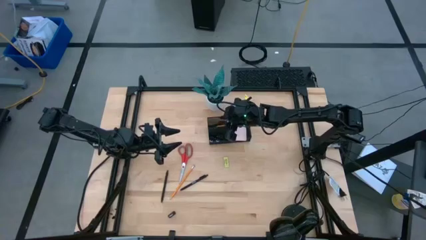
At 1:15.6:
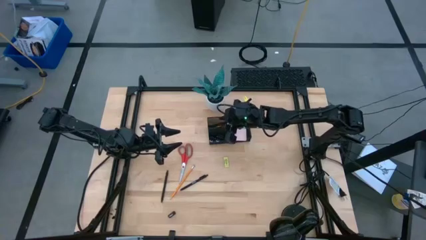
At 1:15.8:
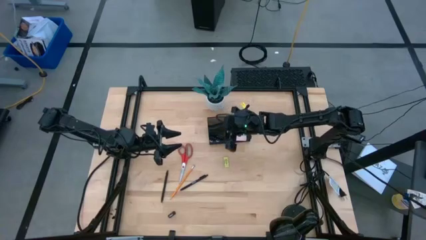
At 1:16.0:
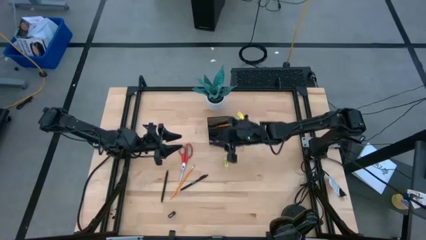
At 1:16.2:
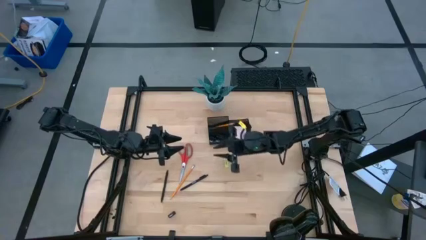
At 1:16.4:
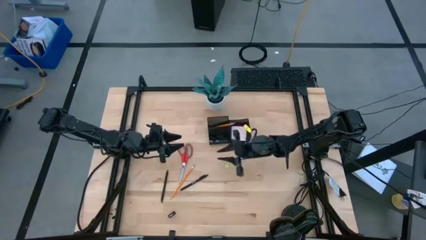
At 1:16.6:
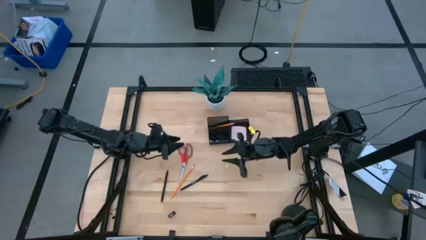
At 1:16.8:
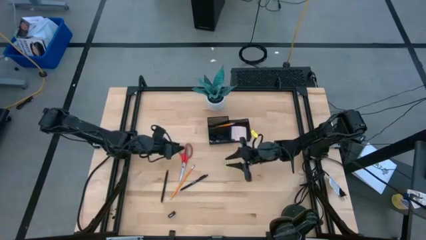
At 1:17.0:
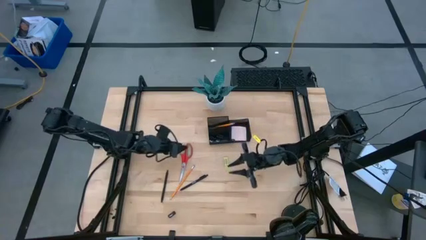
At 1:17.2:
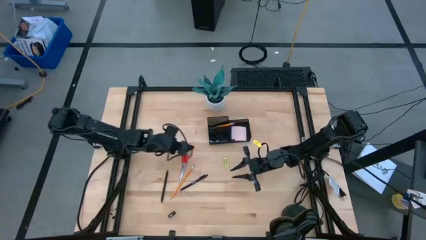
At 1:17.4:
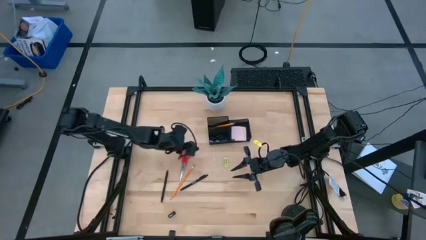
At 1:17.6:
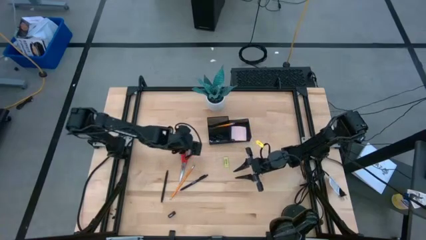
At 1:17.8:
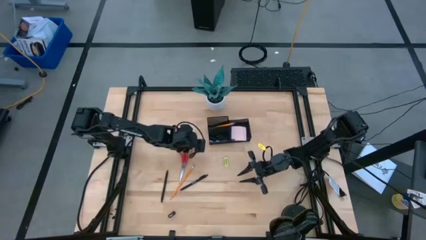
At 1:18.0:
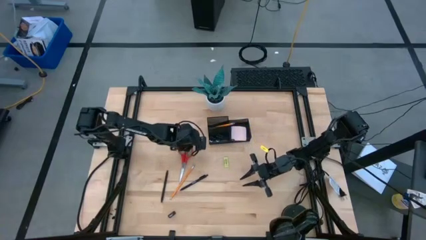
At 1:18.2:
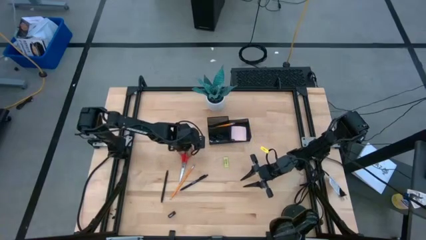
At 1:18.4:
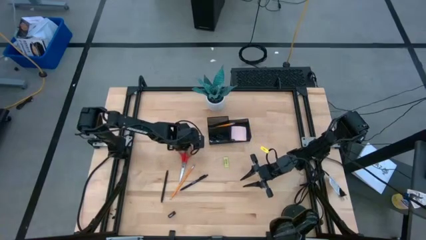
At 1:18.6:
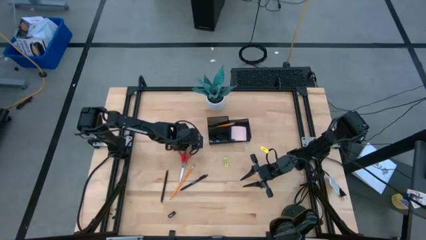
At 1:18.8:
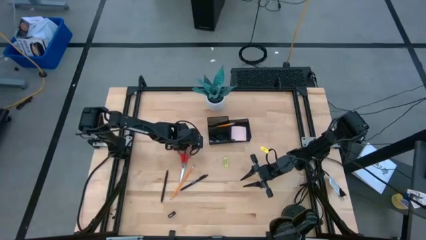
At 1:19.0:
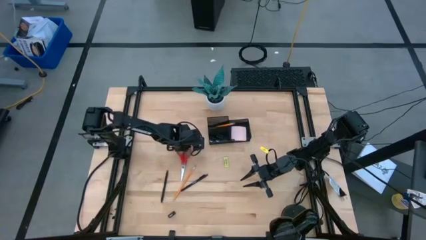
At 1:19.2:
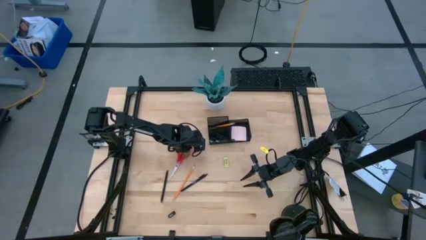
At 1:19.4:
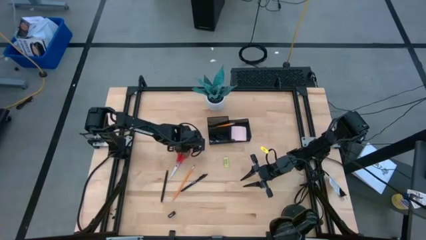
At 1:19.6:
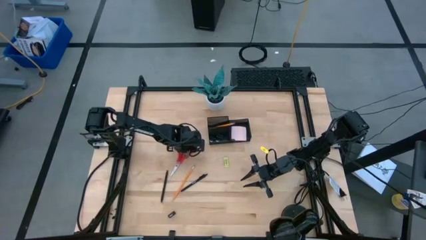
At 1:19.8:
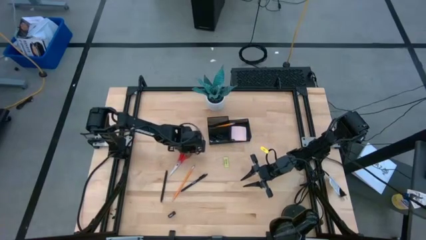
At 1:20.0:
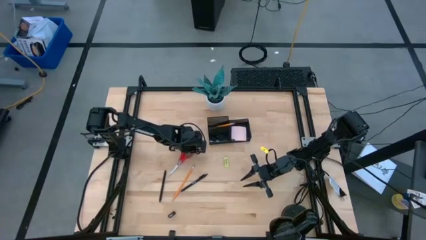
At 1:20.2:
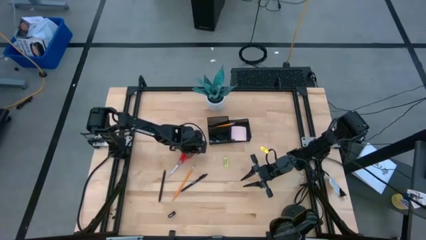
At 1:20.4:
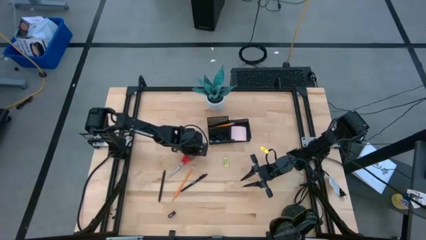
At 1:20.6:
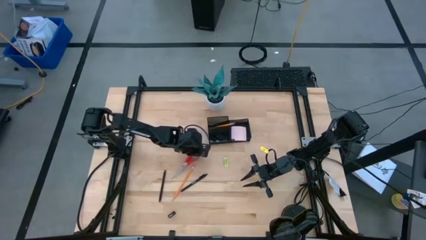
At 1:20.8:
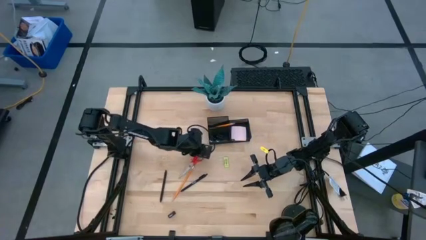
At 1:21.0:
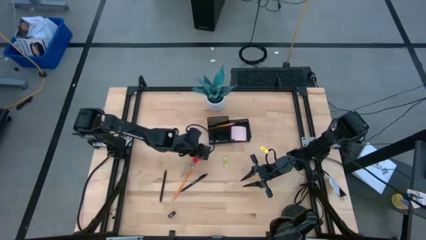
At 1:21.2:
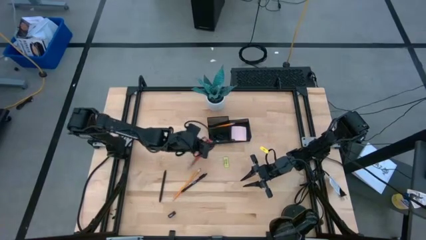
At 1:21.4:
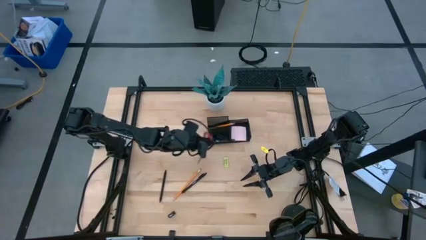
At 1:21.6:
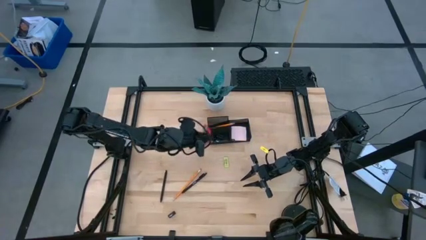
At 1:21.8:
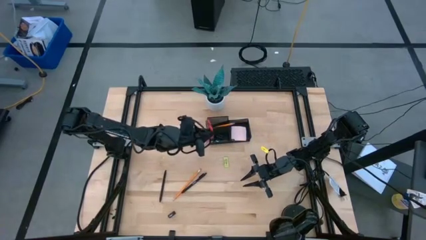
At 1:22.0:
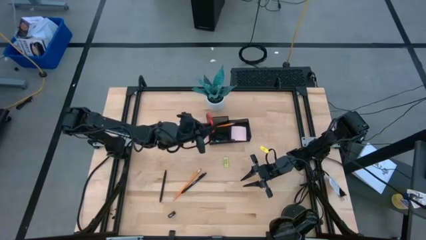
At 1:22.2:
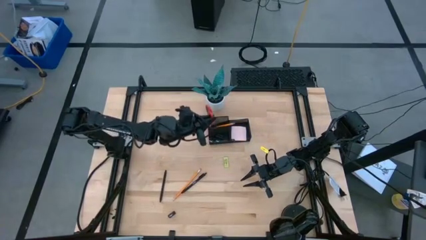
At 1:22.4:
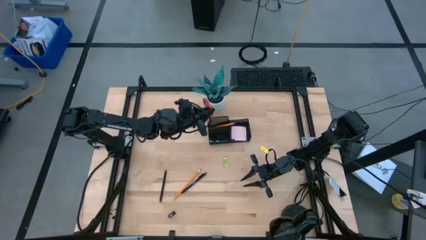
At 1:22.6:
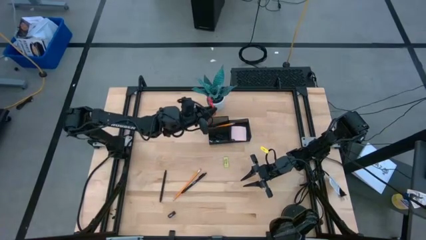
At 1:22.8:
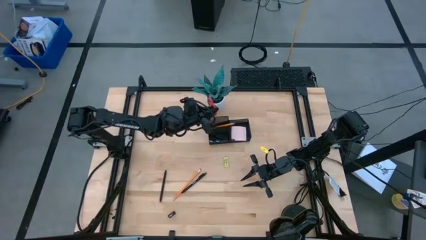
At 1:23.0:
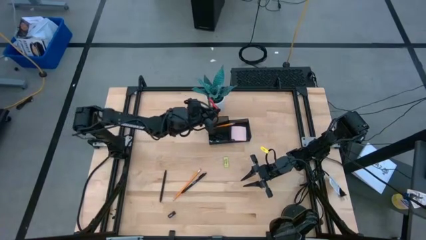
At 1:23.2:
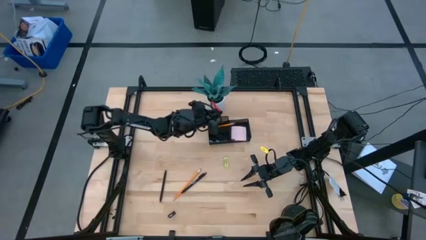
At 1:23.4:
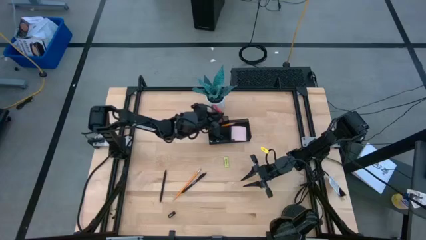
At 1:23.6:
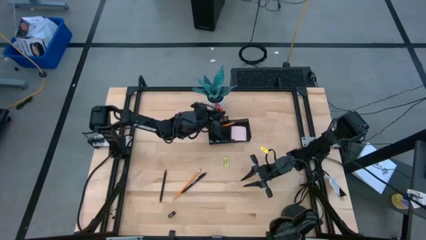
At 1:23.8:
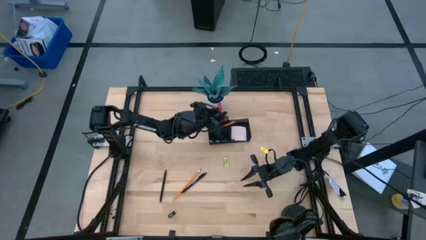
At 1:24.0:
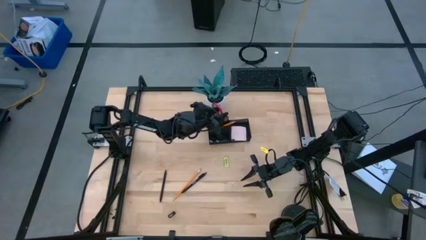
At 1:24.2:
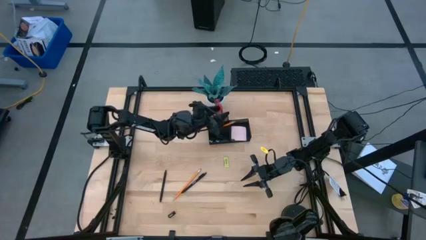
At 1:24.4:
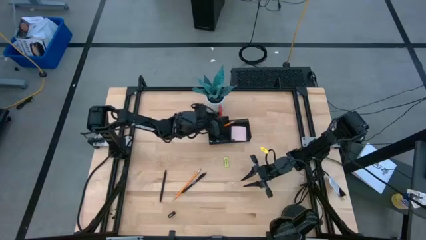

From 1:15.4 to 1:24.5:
Task: Pick and place office supplies into organizer
Put the red scissors into the black desk organizer

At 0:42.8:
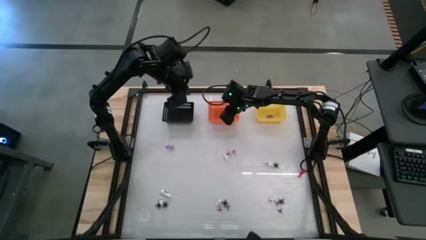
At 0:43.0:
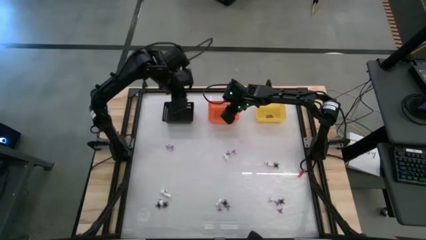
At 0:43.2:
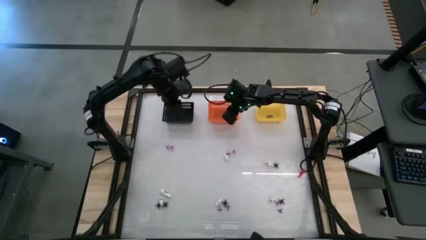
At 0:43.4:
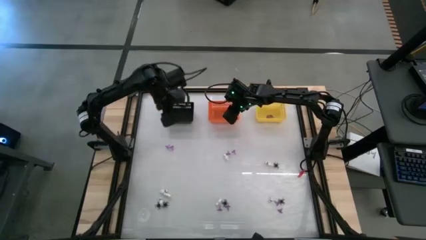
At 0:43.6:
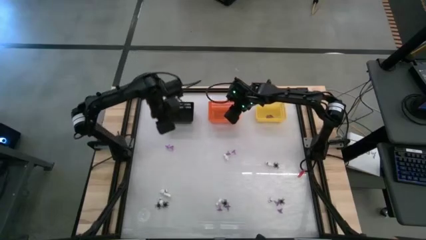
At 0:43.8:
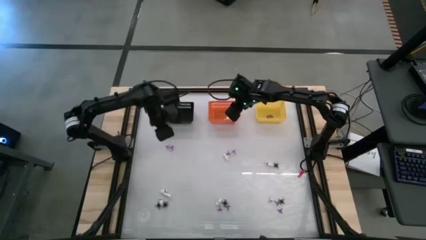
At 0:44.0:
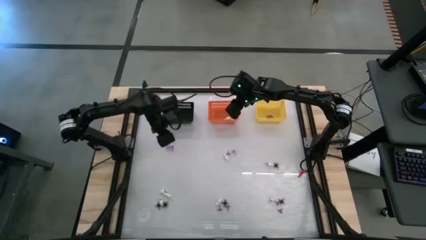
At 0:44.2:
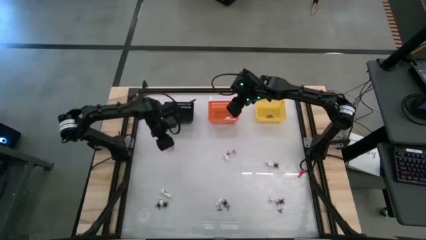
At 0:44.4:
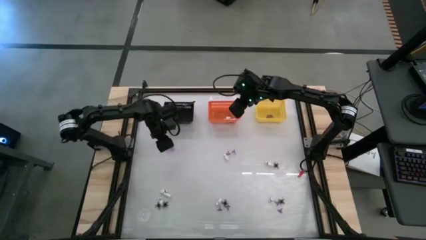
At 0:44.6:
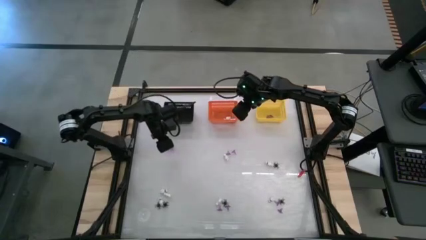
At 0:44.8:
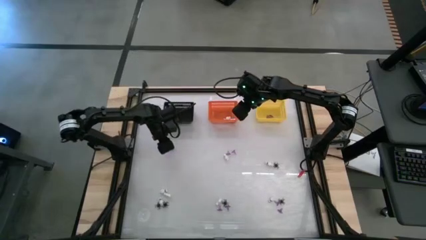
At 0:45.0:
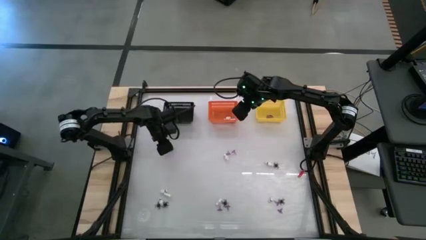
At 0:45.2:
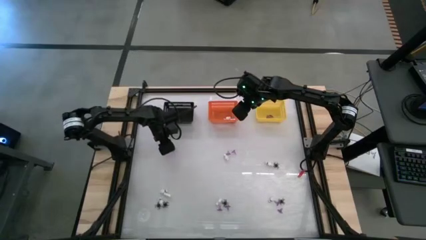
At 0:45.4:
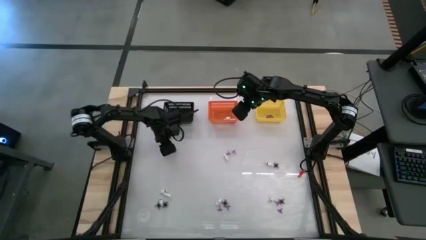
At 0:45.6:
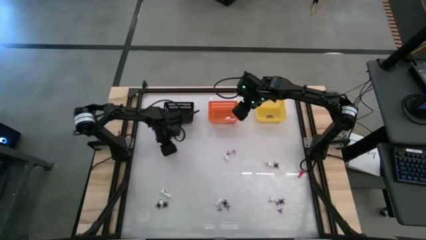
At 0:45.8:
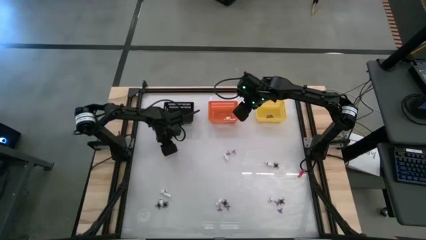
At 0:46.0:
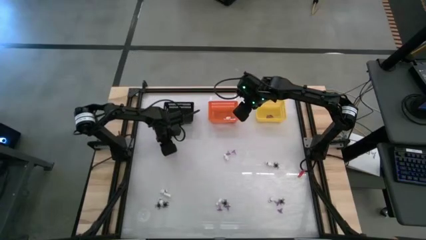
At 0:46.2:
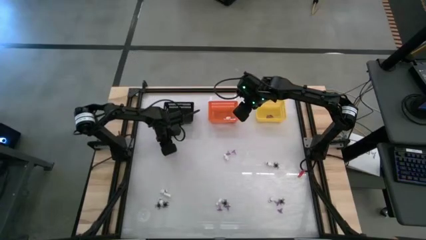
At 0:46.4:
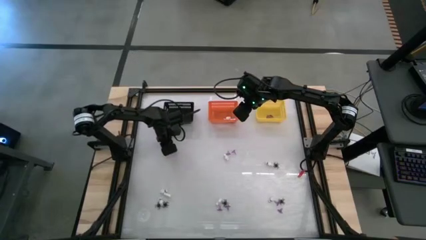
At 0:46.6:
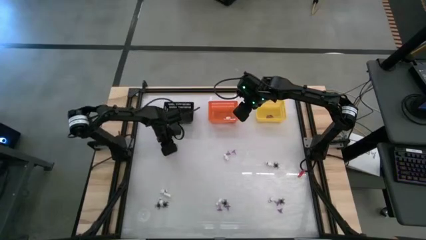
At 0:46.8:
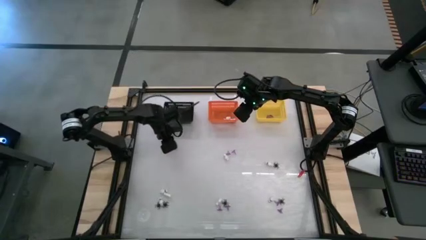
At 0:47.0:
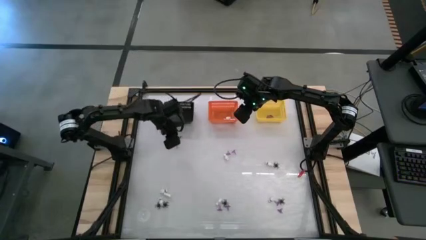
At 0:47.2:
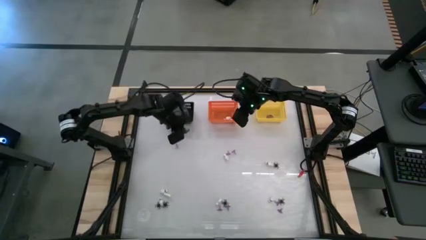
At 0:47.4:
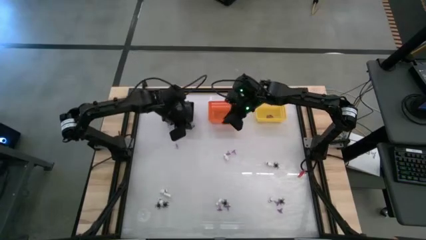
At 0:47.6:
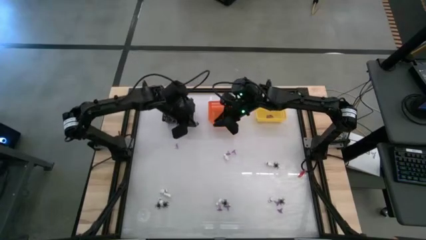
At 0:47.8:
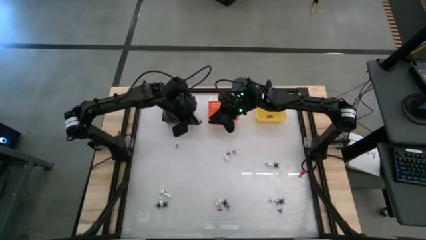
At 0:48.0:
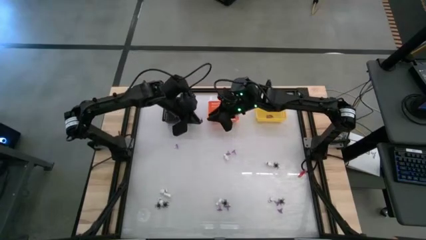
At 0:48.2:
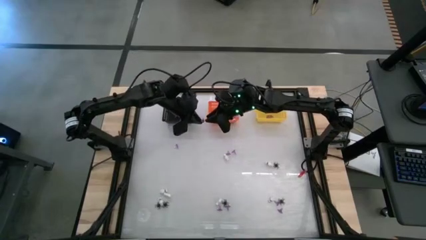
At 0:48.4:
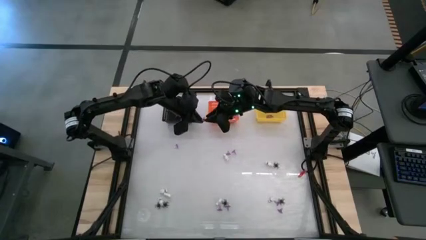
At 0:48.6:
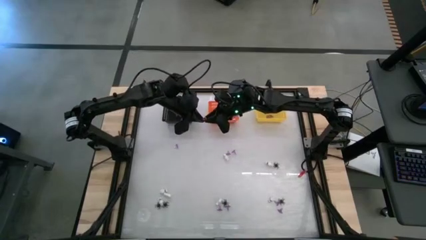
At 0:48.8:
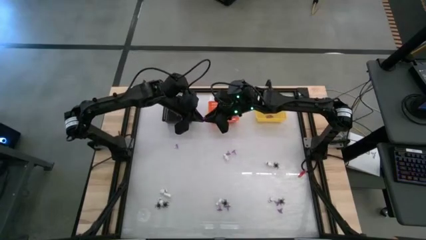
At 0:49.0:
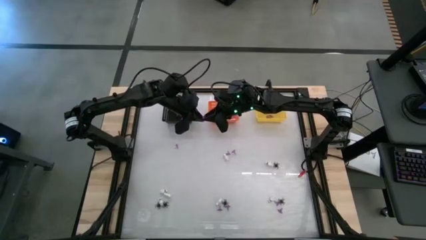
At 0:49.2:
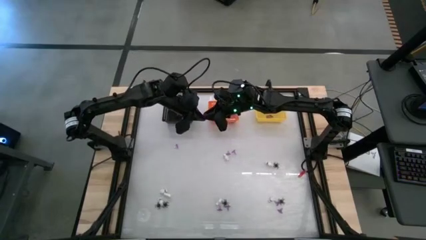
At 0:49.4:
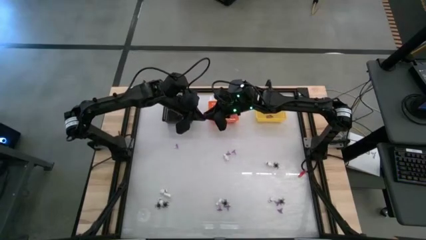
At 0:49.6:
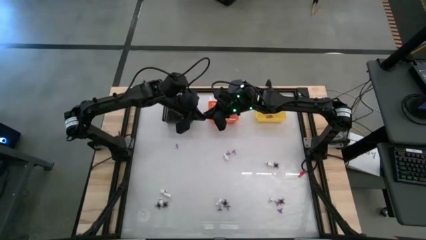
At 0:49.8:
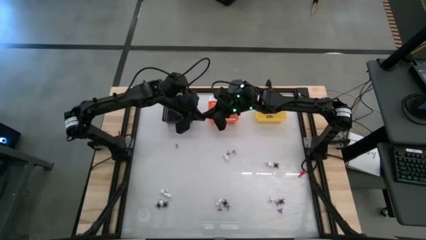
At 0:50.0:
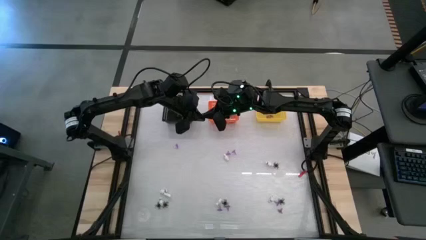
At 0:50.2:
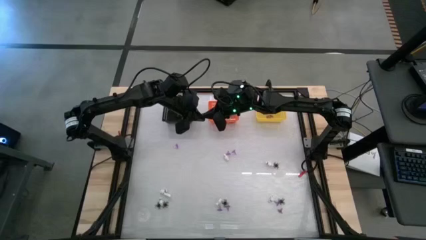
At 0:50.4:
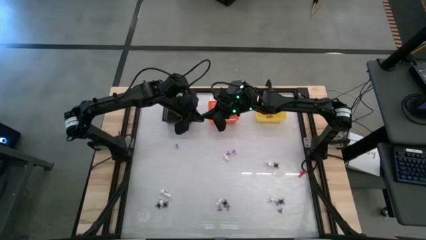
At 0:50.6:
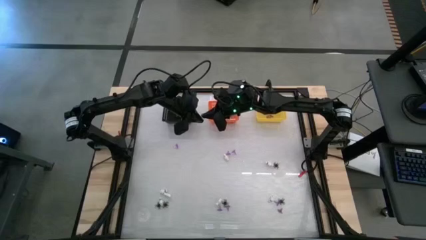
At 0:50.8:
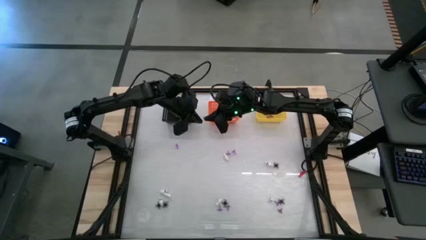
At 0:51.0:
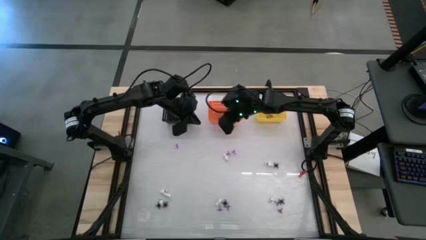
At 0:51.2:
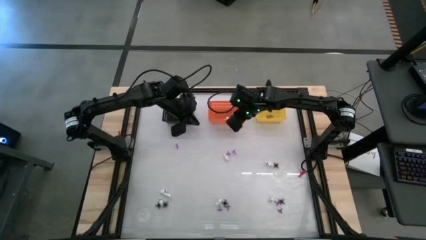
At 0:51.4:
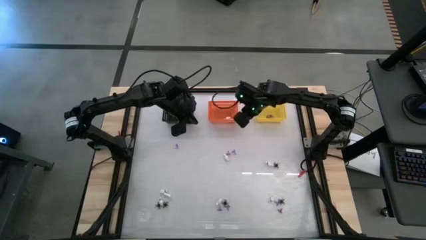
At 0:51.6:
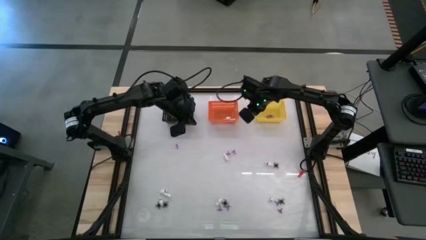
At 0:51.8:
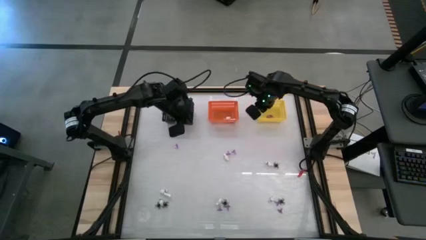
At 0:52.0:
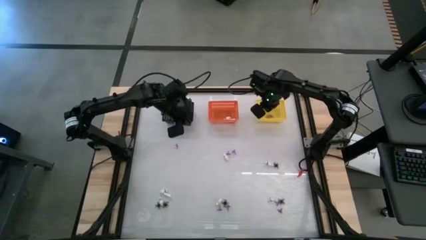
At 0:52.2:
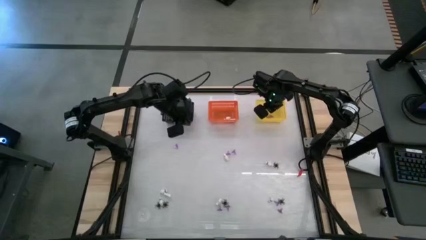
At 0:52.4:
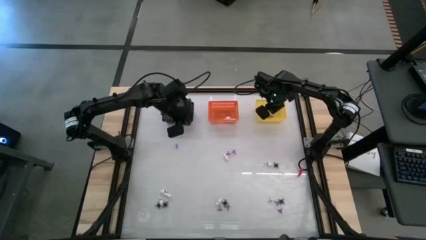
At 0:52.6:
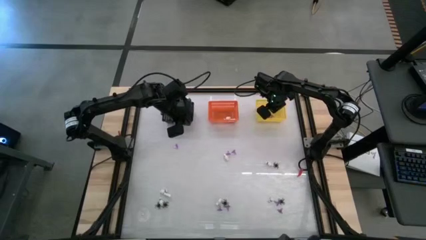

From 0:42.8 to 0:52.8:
Task: Sort Halloween decoration
Put the witch hat toy into the yellow bin
